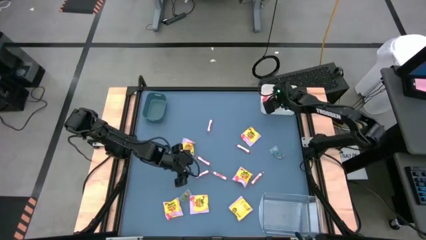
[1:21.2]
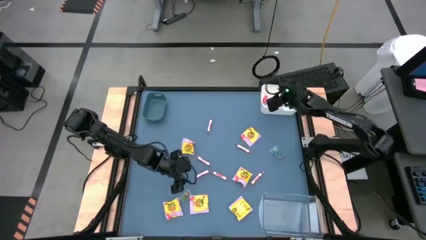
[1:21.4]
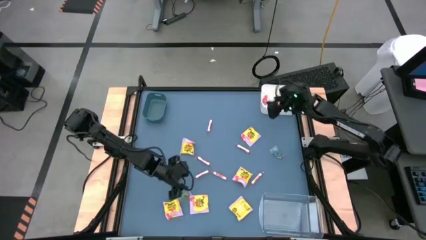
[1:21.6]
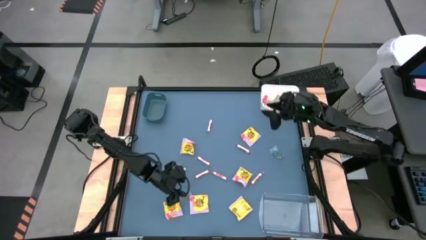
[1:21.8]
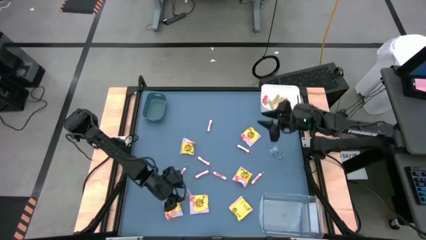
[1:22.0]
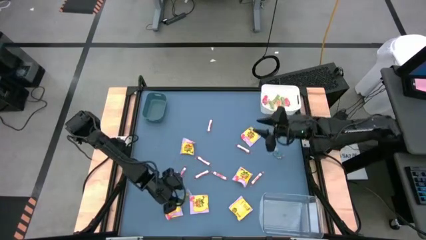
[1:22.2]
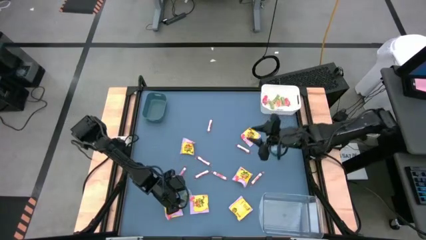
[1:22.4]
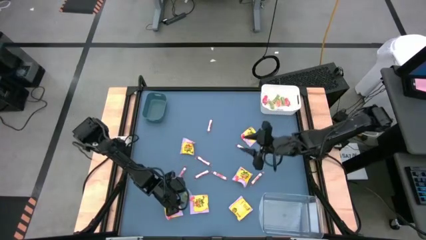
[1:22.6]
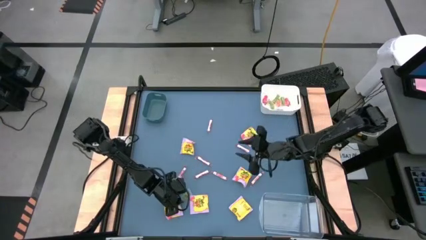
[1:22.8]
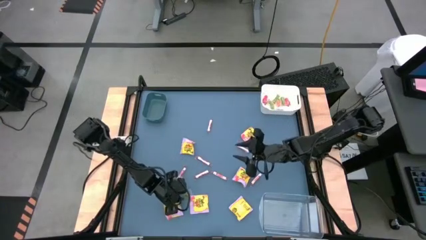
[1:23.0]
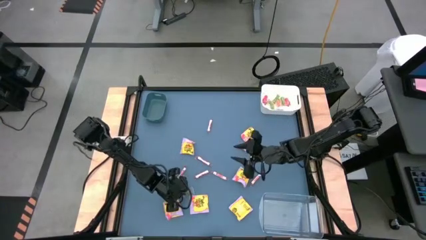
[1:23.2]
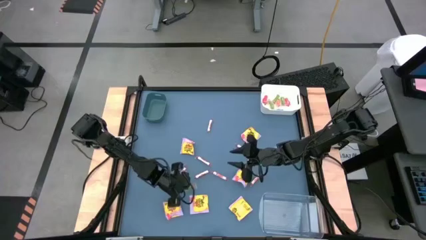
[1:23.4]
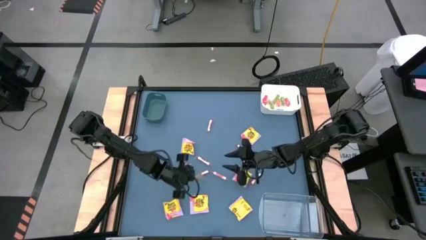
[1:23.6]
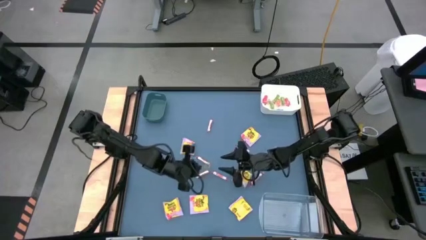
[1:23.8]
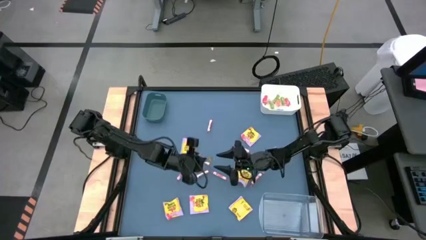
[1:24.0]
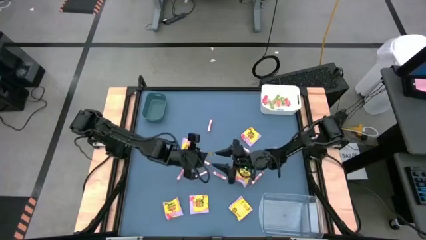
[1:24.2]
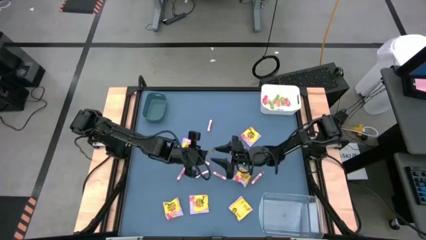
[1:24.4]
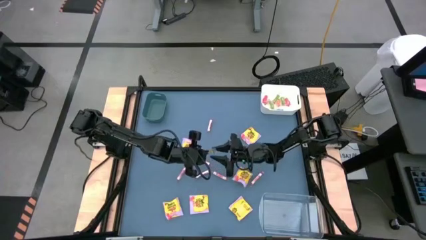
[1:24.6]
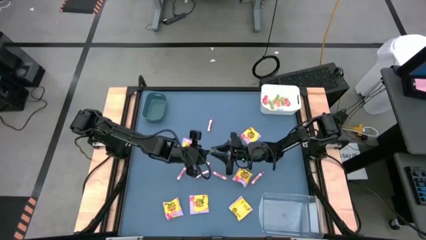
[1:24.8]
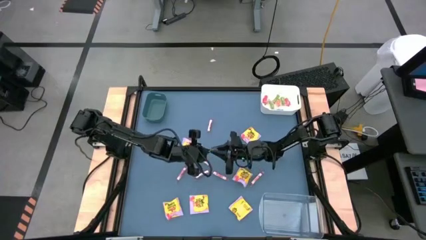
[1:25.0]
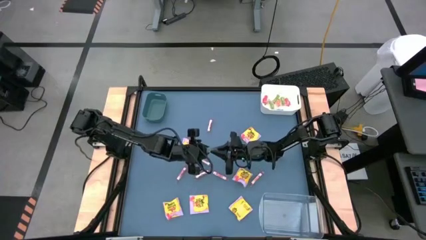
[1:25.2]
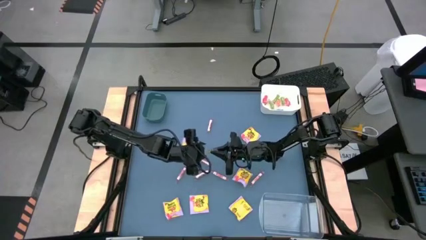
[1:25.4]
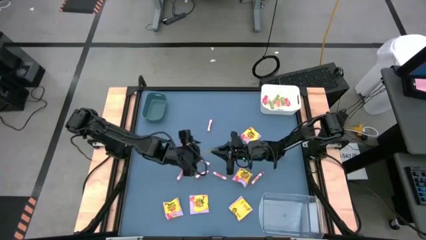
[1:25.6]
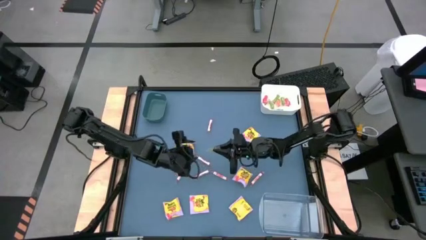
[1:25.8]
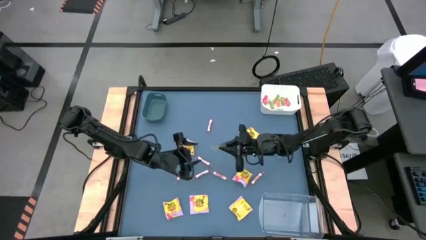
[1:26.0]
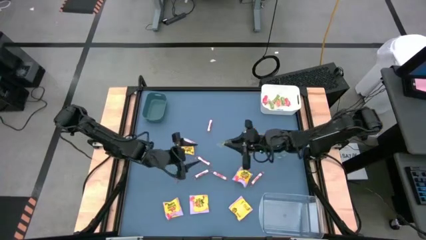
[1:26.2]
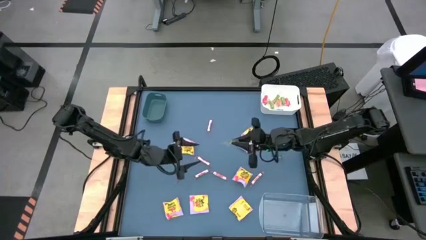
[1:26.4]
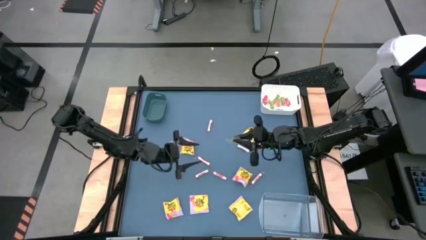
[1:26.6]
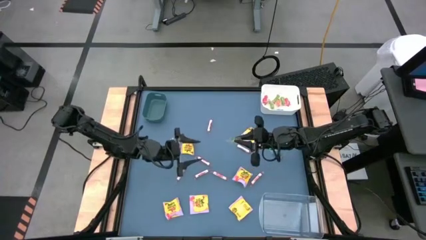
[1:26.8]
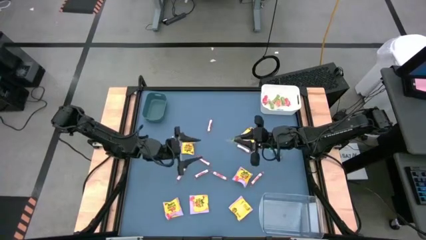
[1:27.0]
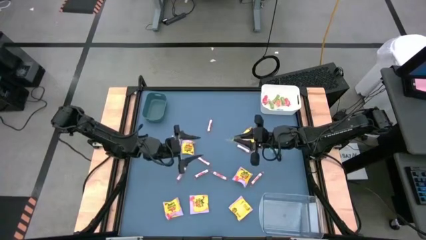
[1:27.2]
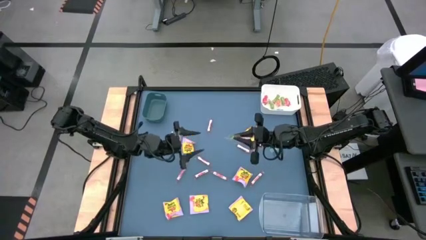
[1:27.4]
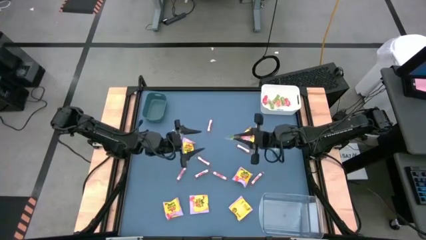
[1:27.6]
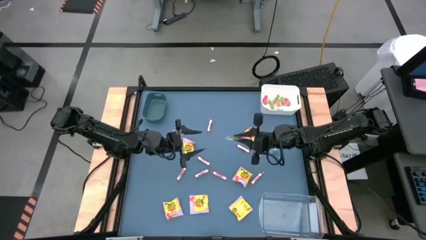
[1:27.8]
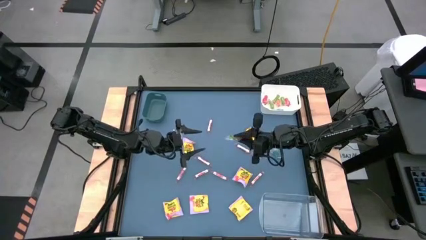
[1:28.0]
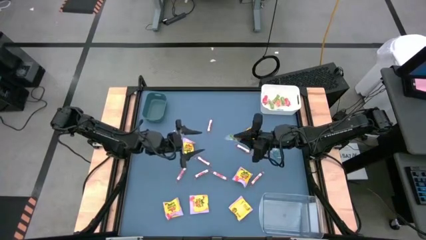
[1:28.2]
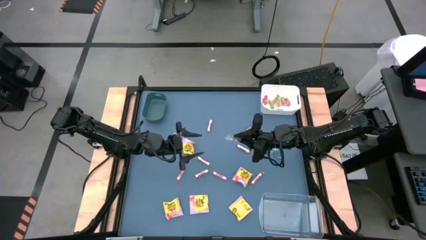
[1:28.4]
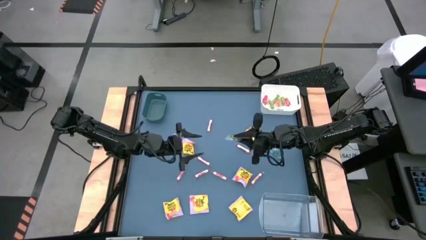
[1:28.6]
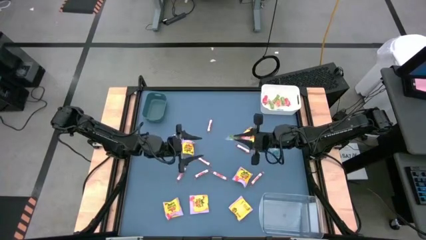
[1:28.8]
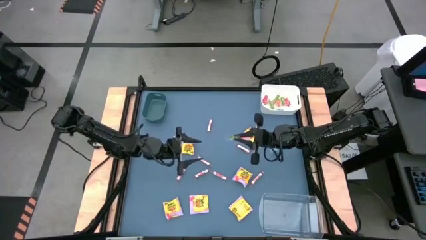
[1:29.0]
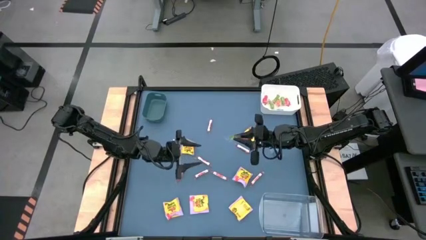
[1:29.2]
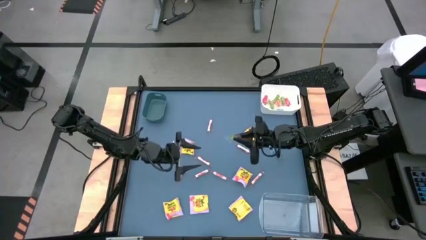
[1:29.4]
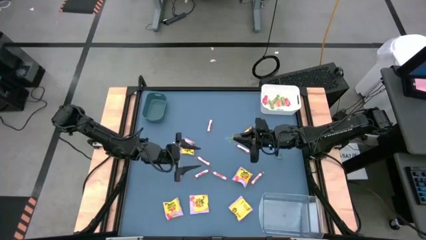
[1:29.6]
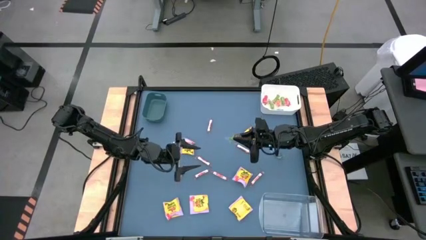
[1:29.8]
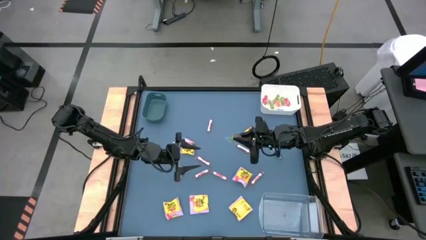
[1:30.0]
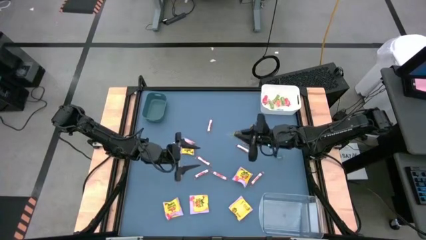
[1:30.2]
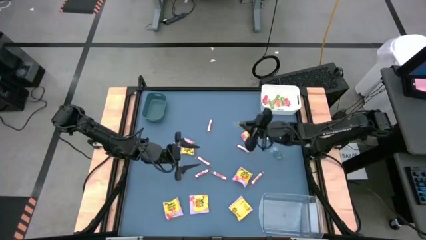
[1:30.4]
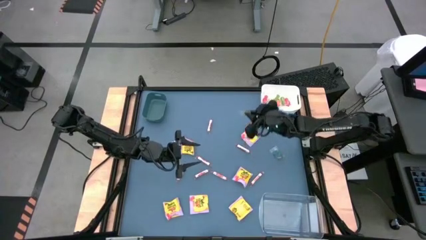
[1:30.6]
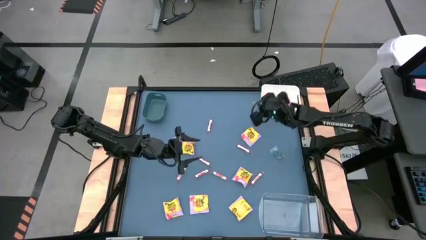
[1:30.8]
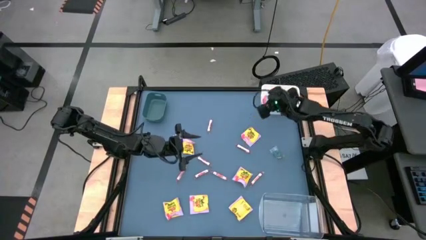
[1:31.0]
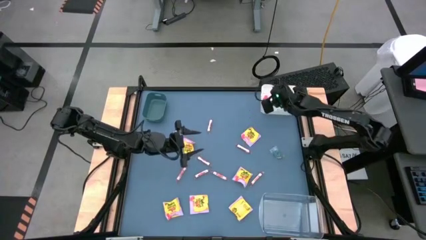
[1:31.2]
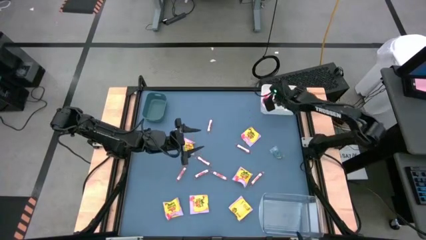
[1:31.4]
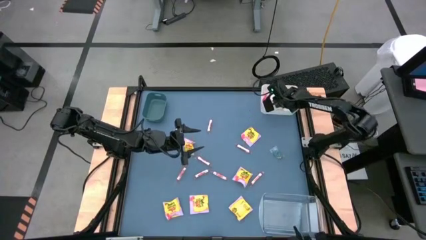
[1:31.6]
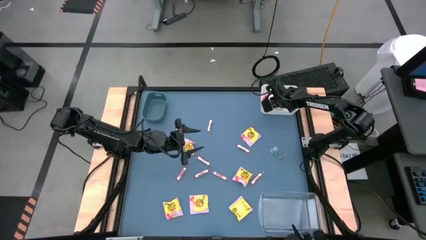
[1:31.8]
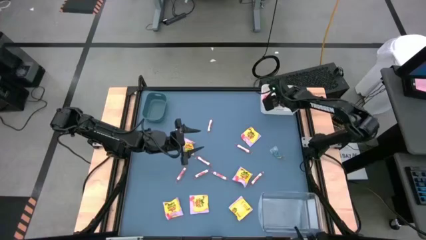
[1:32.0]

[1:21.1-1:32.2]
Task: Sort candy
Put the green gummy into the white bin
